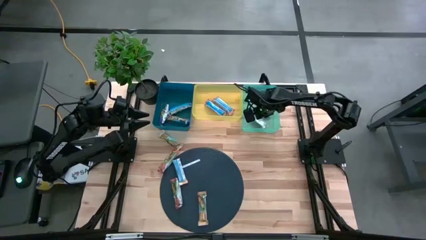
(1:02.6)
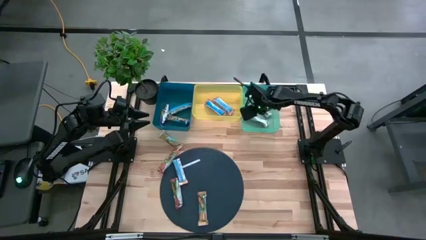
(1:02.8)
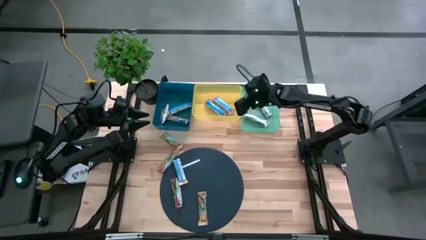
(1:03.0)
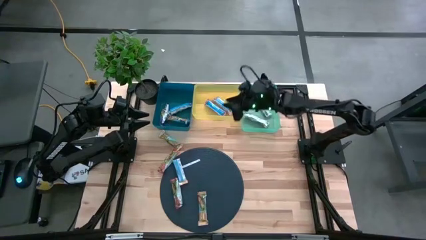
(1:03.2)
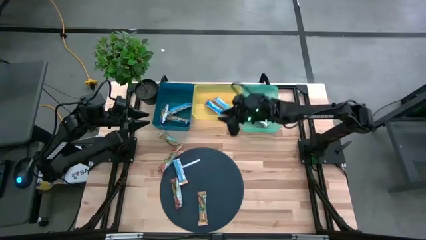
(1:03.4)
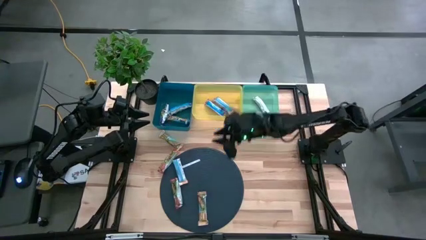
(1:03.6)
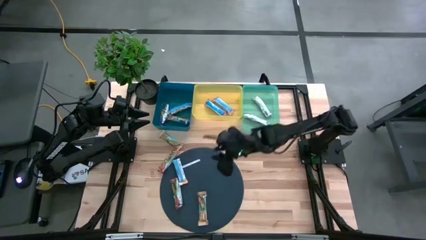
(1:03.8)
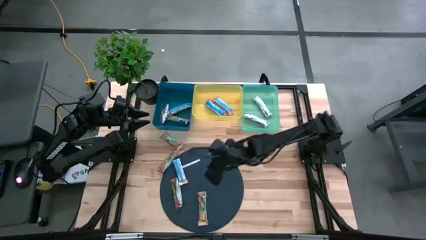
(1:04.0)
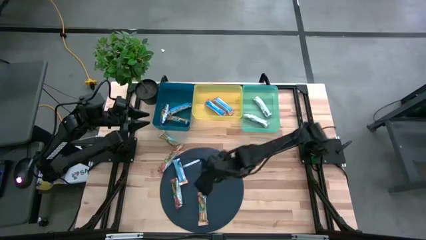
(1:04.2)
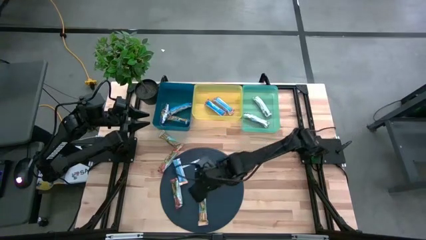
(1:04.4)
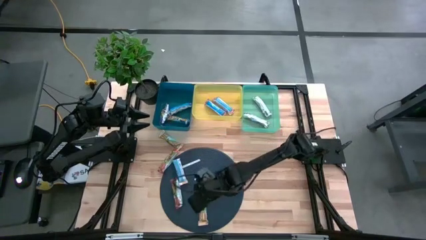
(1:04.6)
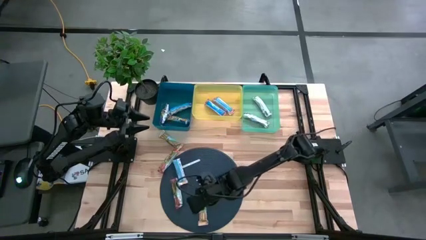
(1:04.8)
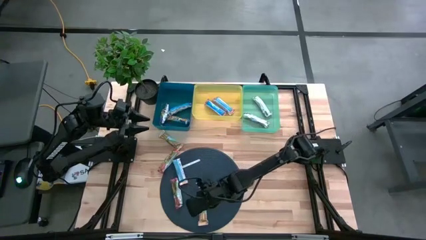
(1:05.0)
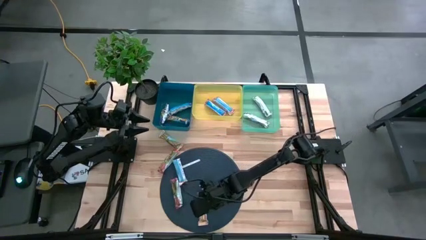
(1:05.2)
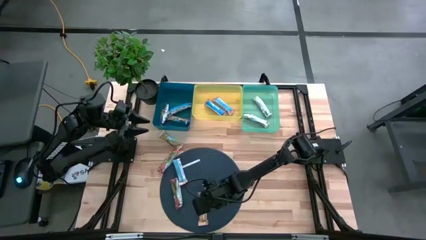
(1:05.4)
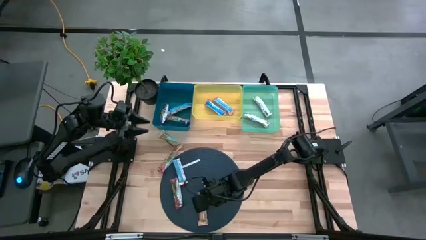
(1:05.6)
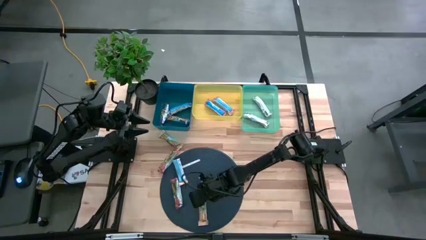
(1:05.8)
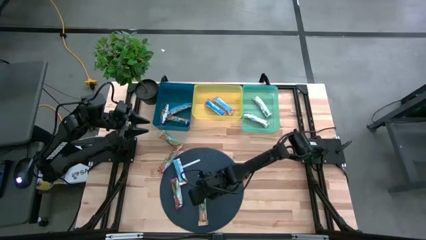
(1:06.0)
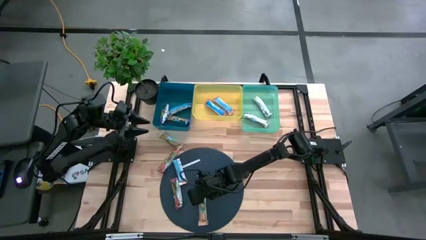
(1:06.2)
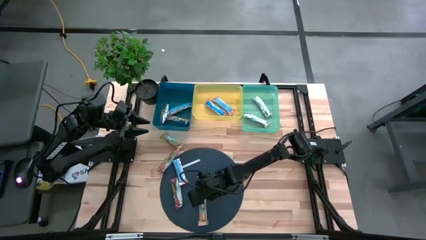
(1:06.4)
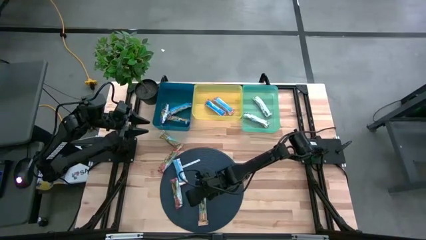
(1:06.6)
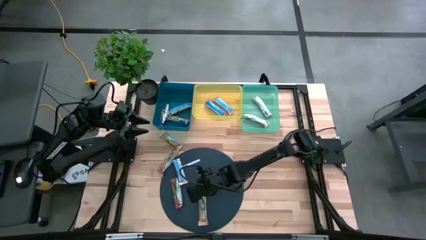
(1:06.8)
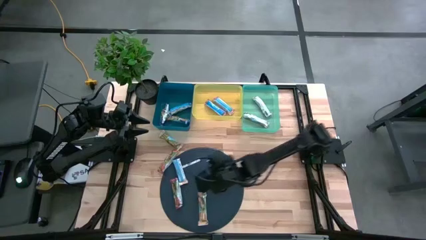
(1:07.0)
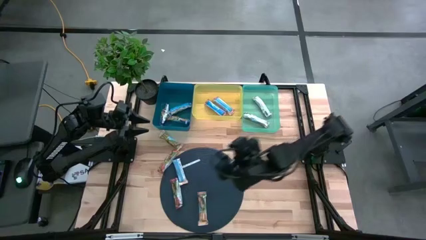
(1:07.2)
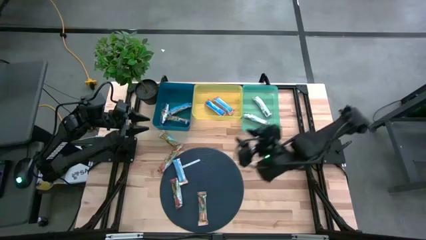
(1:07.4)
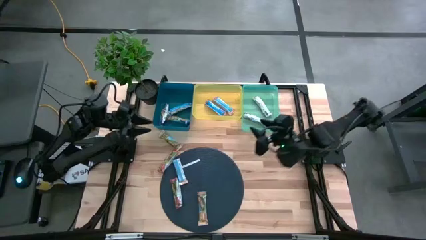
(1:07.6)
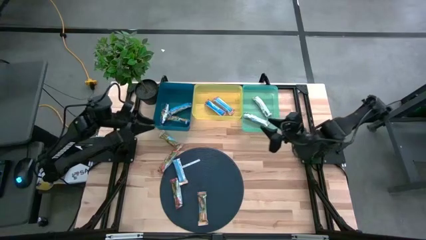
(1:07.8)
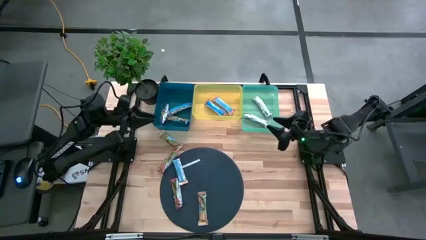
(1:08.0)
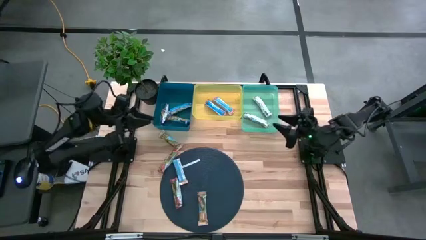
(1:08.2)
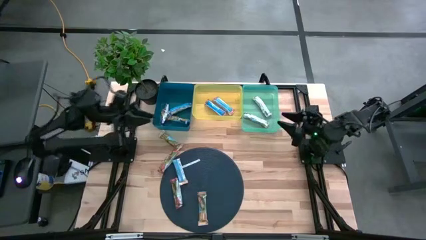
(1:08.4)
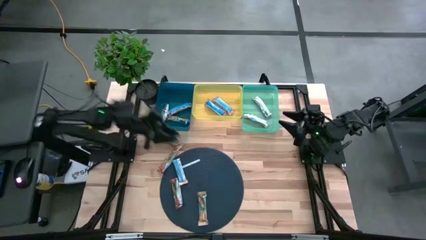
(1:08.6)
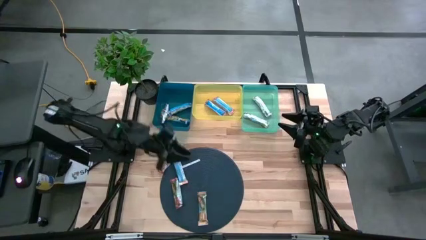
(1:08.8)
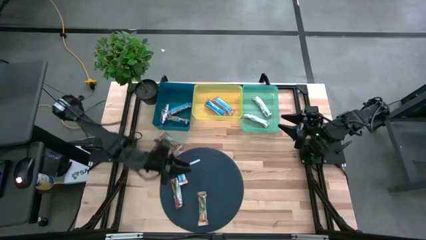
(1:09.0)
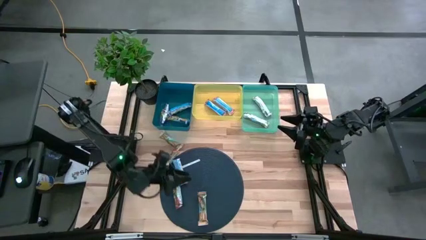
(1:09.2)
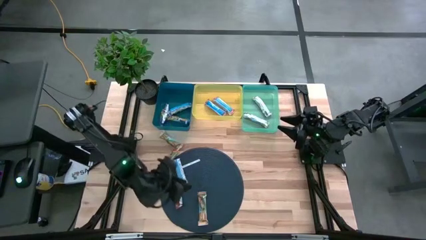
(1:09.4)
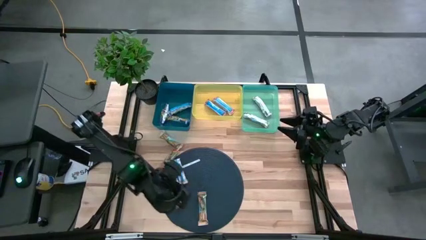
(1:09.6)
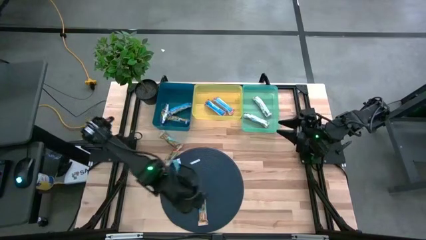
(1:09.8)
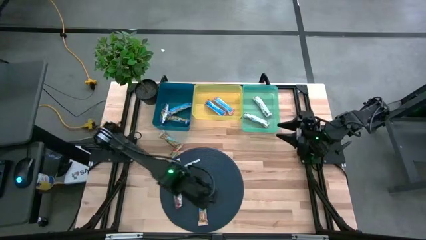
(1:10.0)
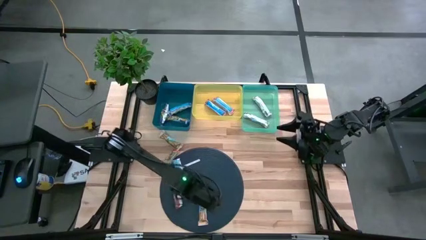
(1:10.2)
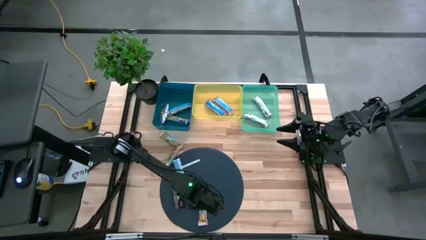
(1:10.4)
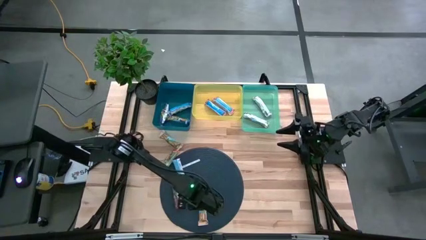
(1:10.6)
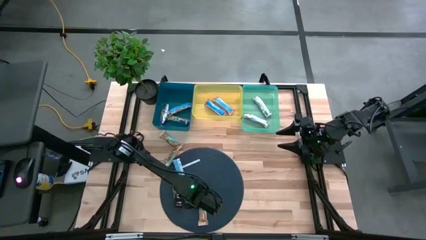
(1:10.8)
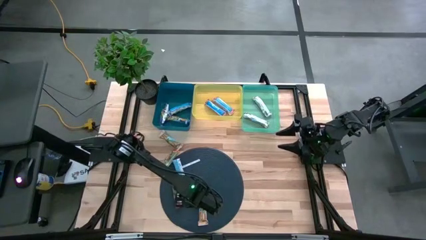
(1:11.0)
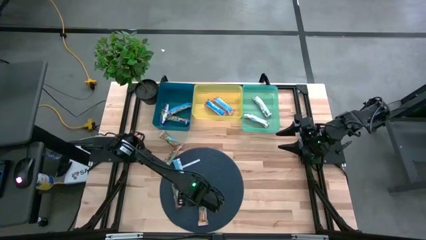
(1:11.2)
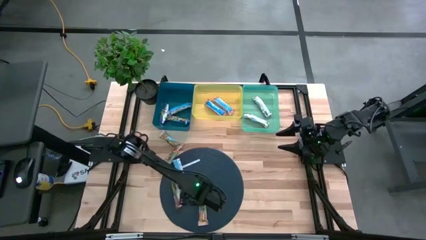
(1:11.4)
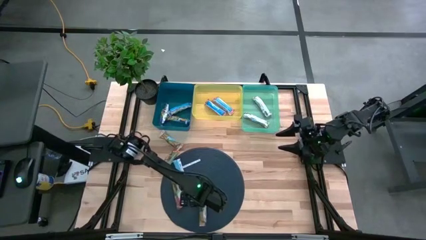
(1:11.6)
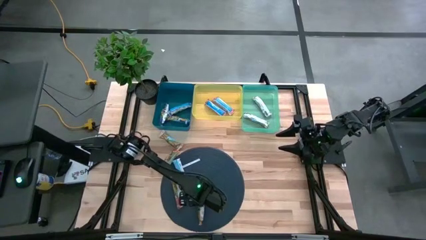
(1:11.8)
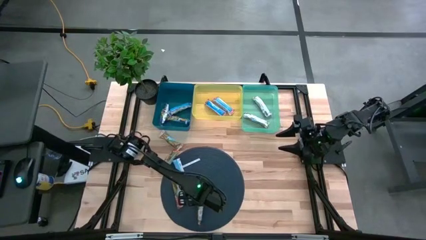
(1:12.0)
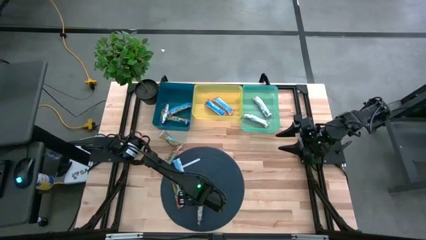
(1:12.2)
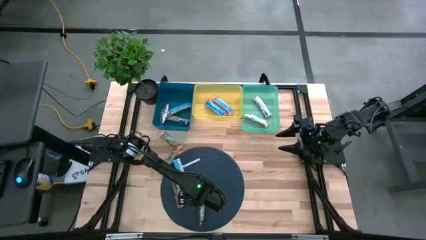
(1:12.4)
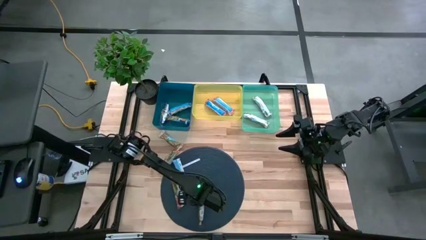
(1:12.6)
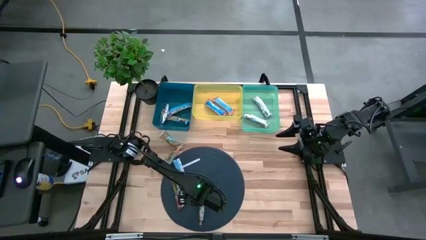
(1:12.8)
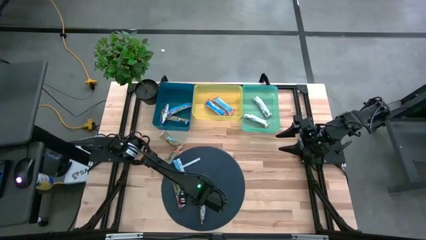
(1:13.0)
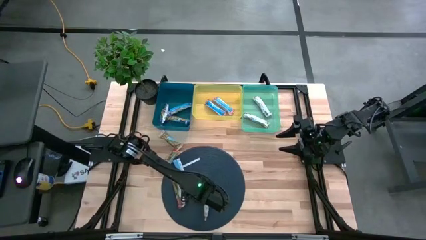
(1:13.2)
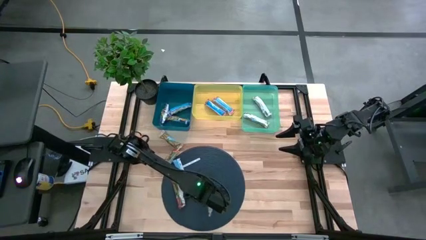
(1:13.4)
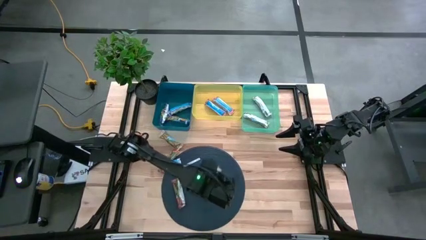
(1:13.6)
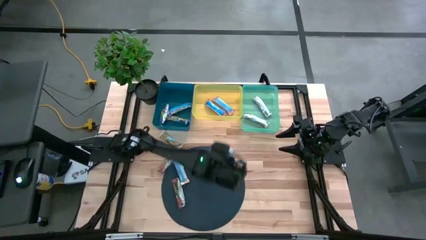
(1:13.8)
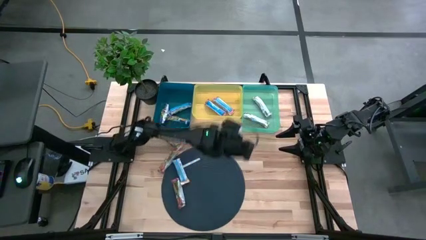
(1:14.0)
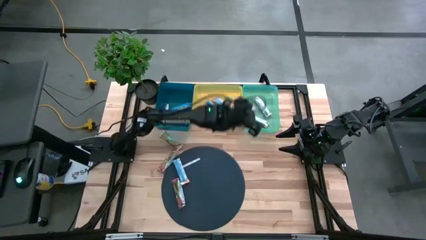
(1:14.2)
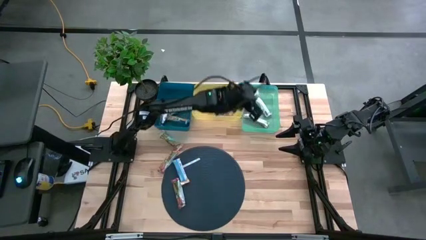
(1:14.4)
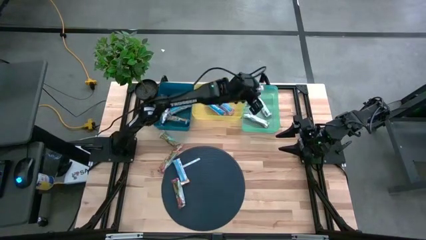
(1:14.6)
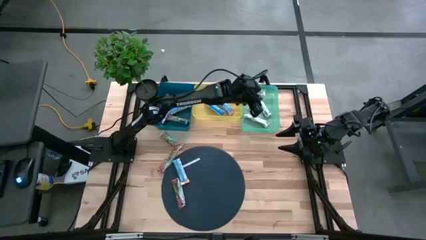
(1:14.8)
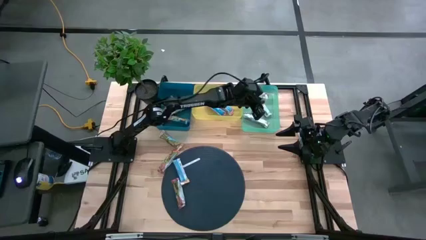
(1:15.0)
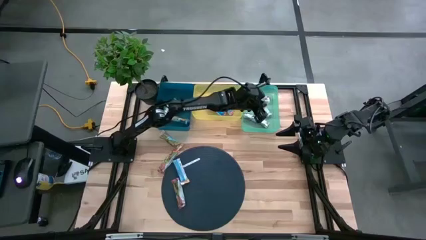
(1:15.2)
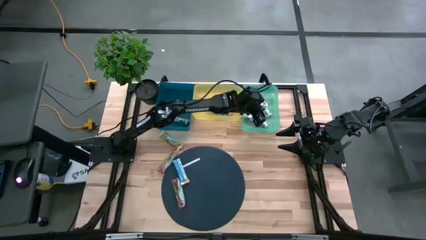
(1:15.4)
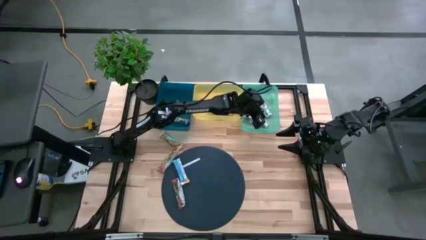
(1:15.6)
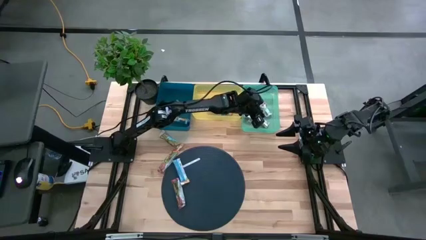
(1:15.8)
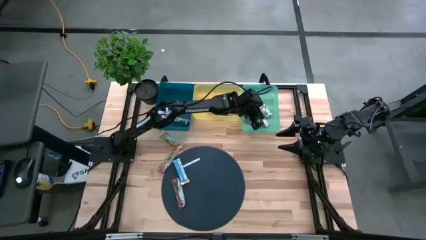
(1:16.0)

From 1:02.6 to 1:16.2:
Task: Pick and place Granola Bars by type
Put the yellow granola bar into the green bin

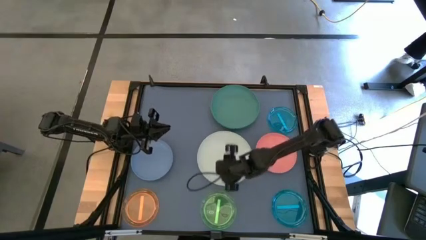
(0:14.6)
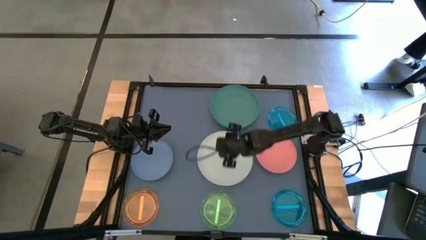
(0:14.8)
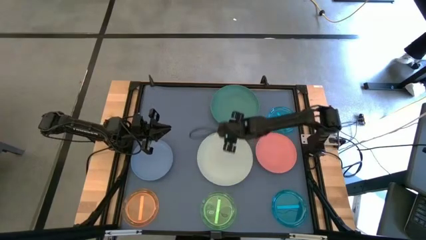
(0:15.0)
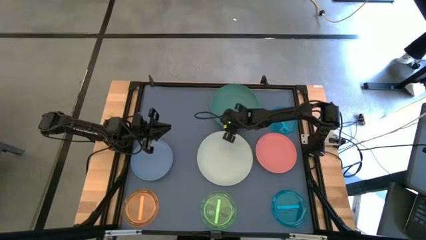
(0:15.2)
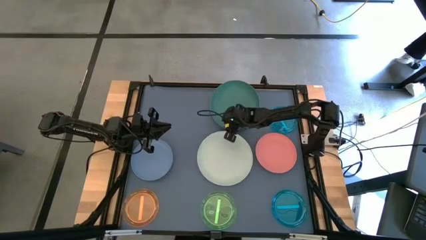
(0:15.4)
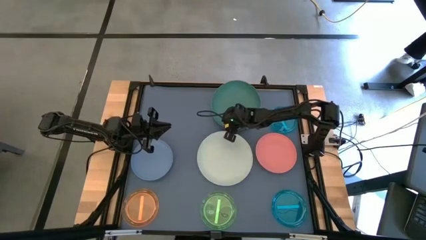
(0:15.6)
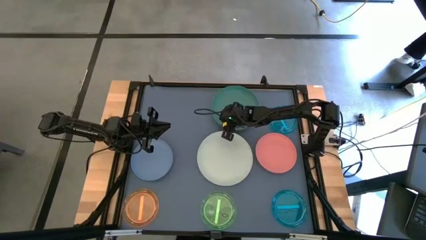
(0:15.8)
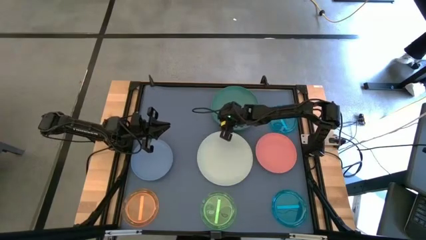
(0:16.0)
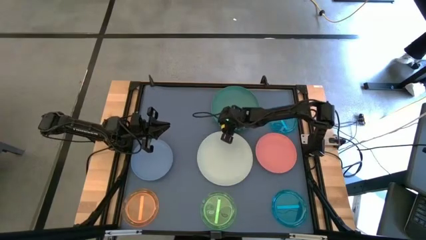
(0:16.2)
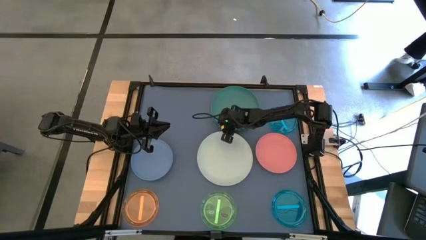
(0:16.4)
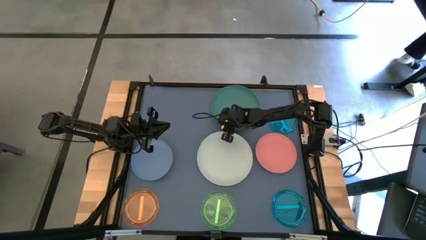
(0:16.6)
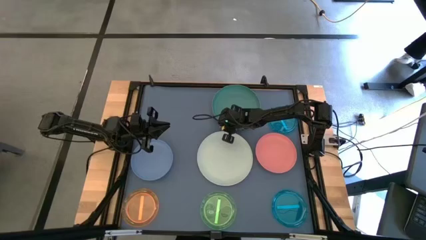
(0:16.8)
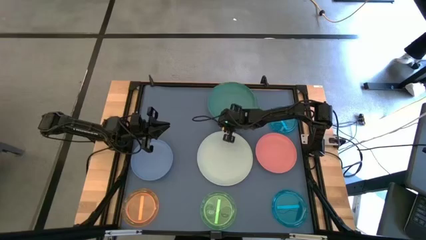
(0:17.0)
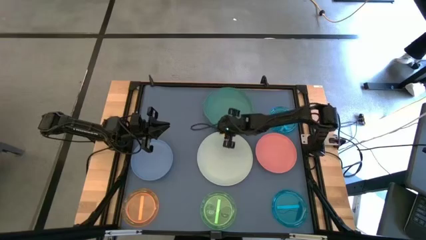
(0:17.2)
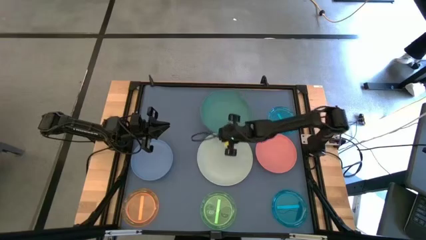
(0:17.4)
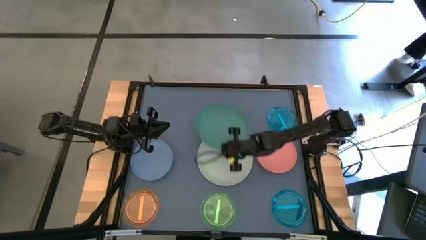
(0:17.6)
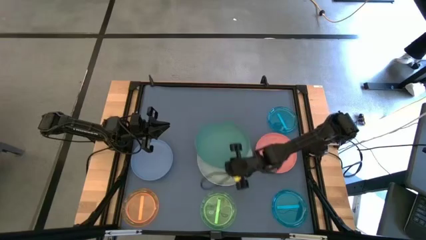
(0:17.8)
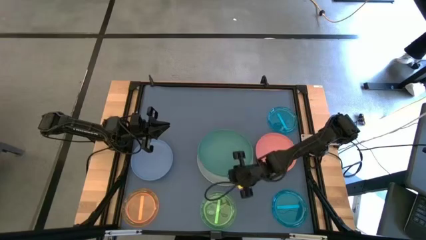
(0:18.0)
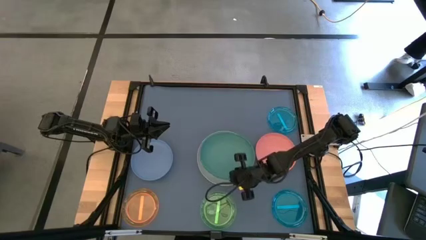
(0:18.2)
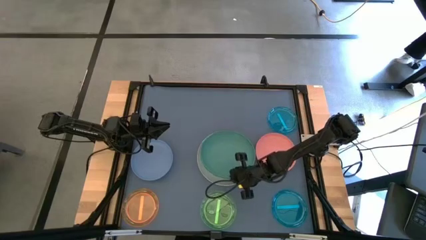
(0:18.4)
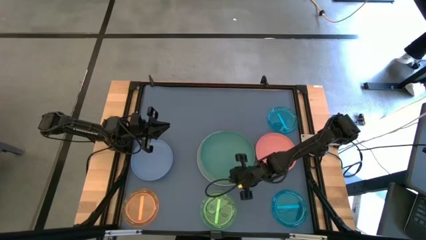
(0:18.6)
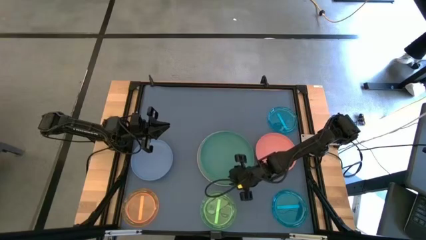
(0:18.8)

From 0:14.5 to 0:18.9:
Task: Stack plastic plates
Stack the stacked green plate on top of the white plate
